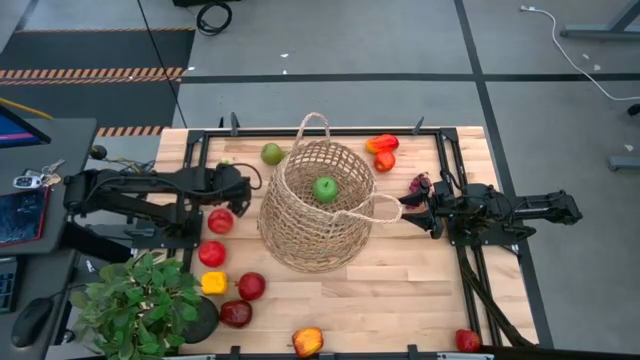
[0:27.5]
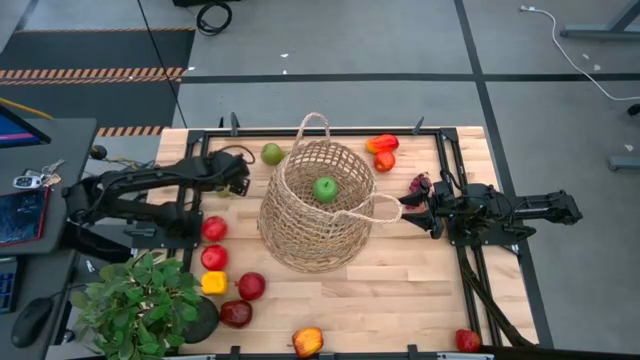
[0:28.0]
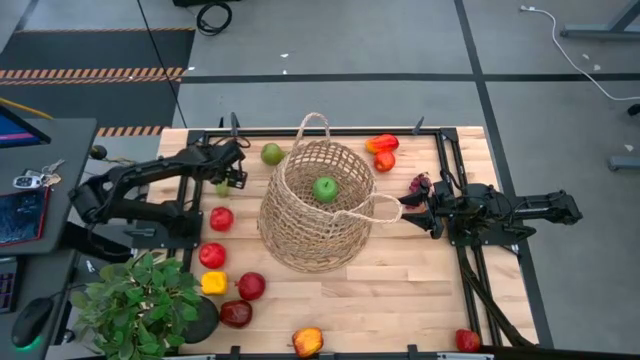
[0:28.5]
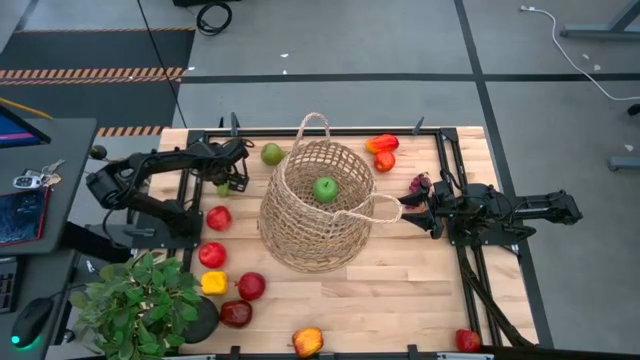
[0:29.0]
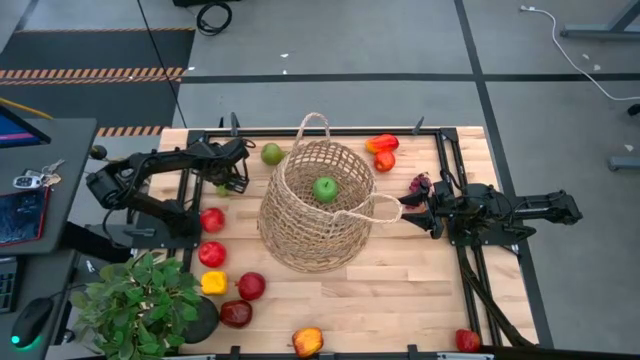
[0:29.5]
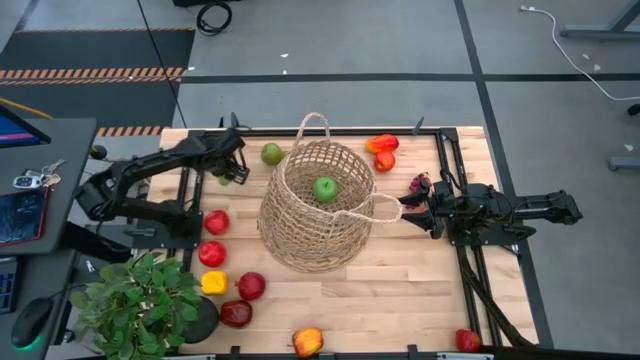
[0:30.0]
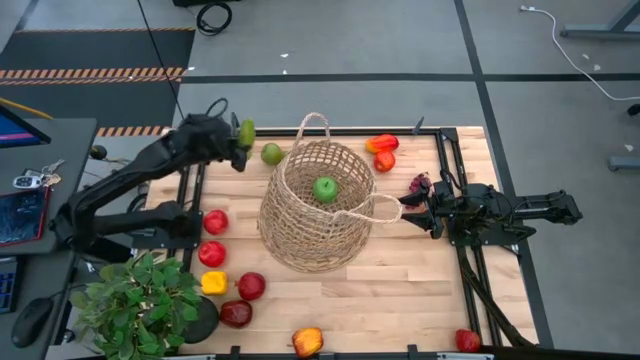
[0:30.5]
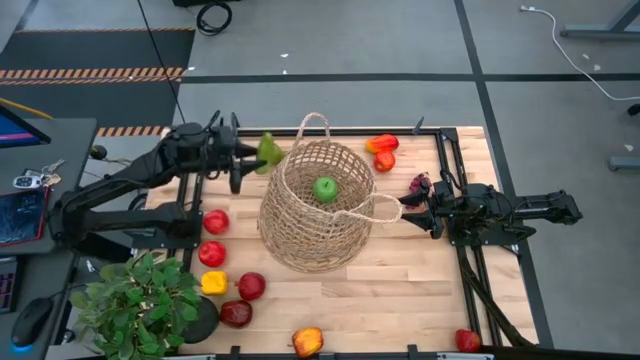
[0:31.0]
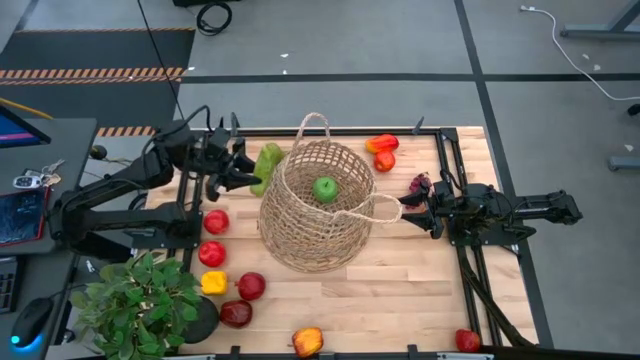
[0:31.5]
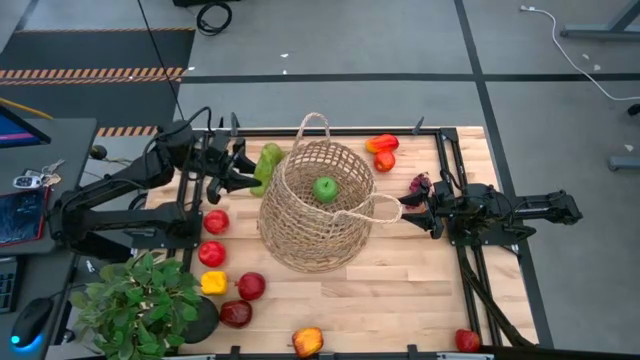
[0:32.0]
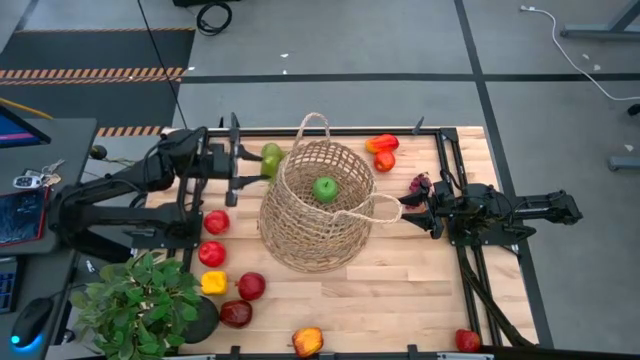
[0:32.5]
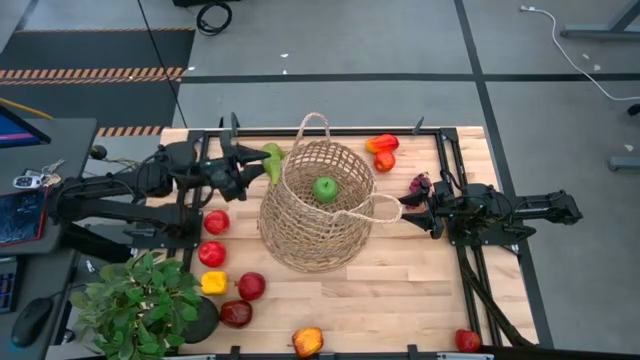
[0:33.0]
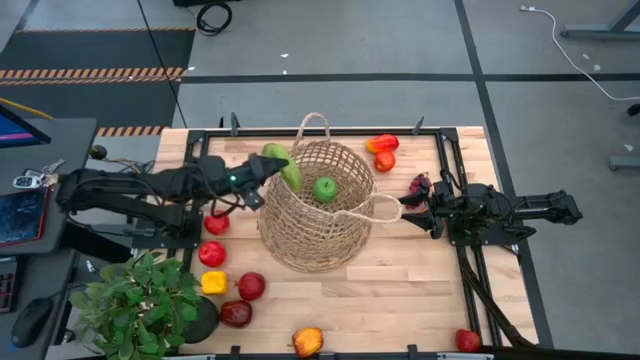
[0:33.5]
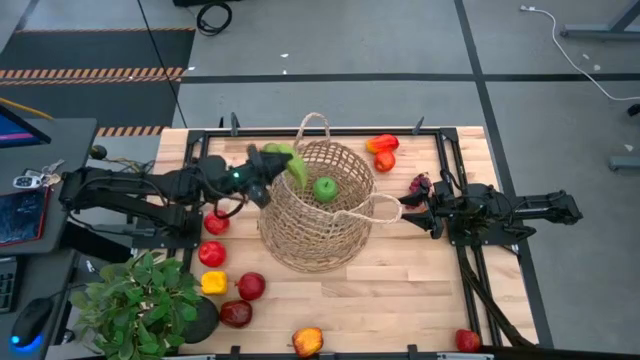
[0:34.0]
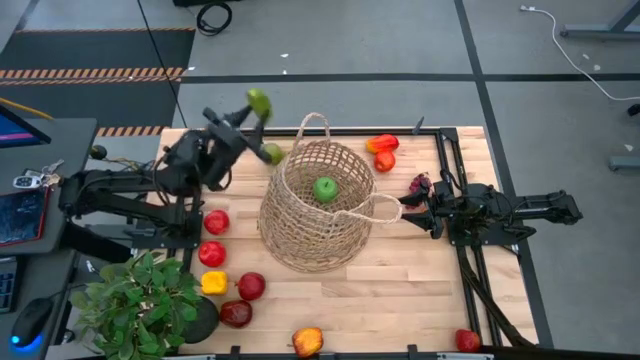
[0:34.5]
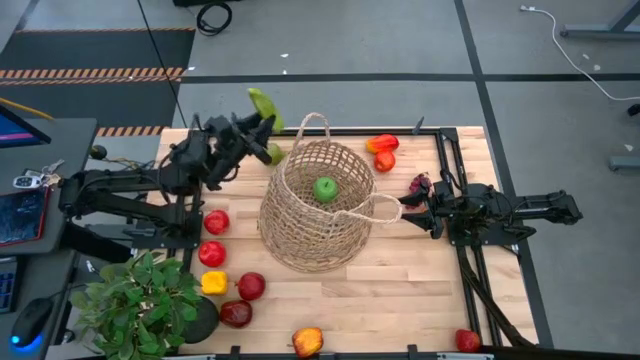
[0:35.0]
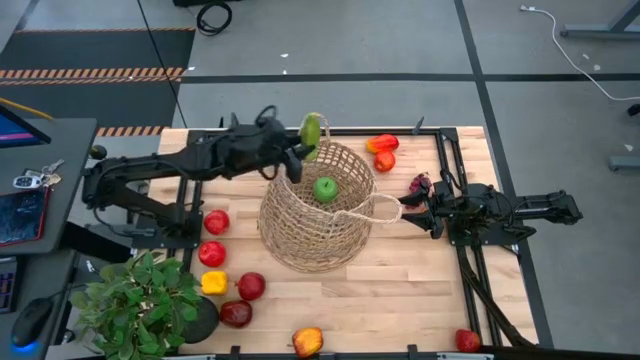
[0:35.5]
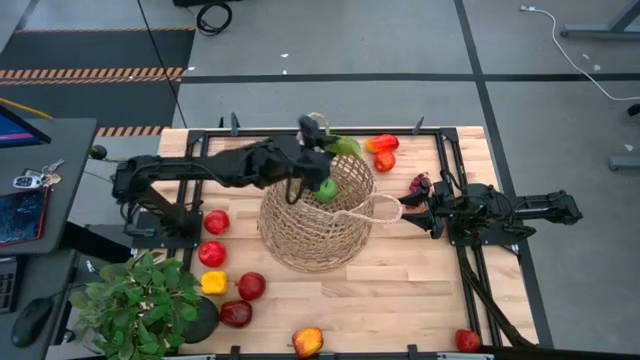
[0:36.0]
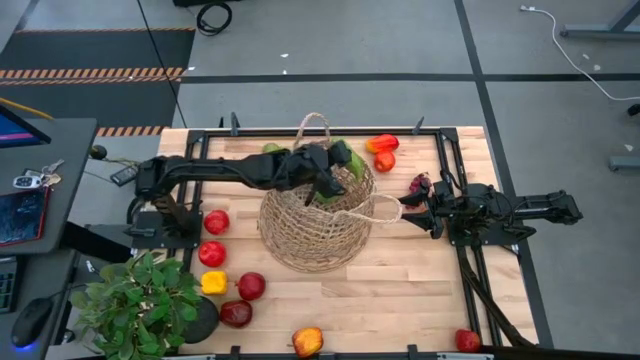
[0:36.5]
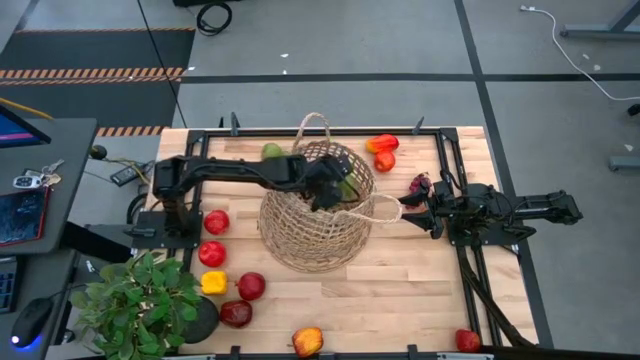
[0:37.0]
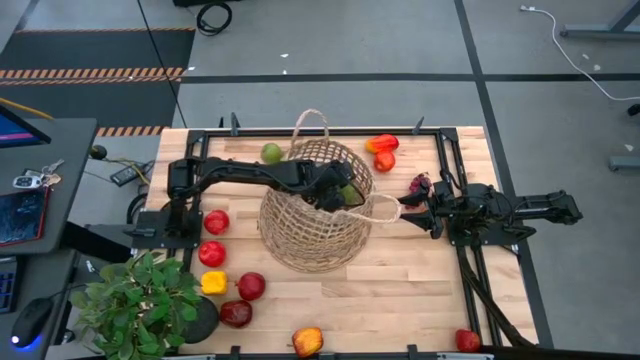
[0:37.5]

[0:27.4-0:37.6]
Task: Build produce basket
Put the cucumber into the basket

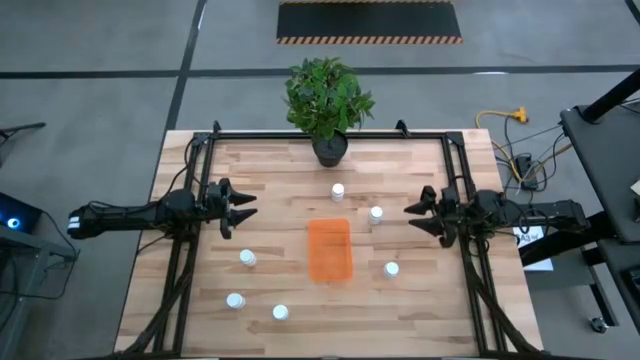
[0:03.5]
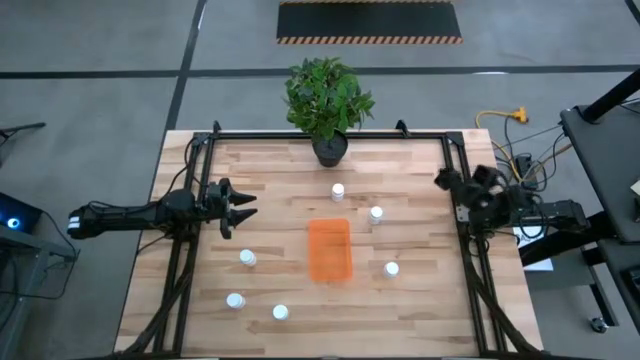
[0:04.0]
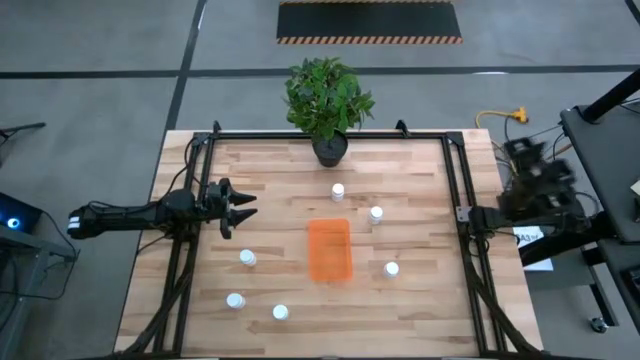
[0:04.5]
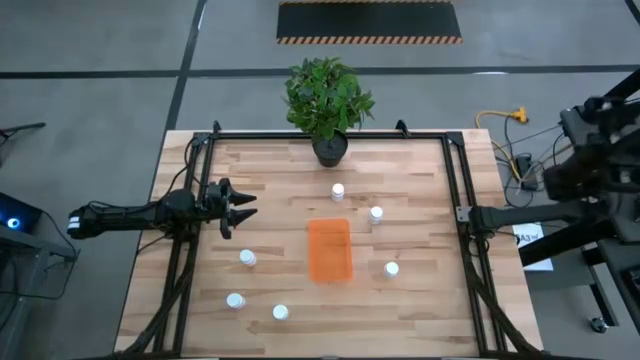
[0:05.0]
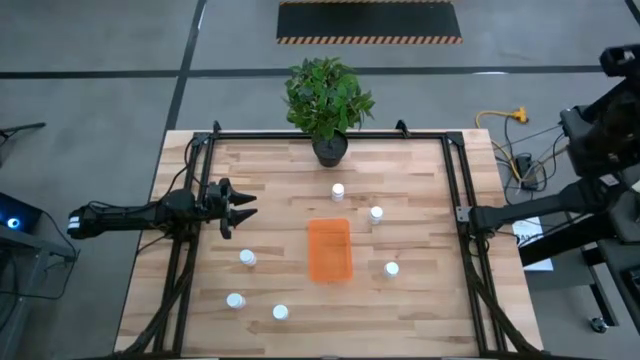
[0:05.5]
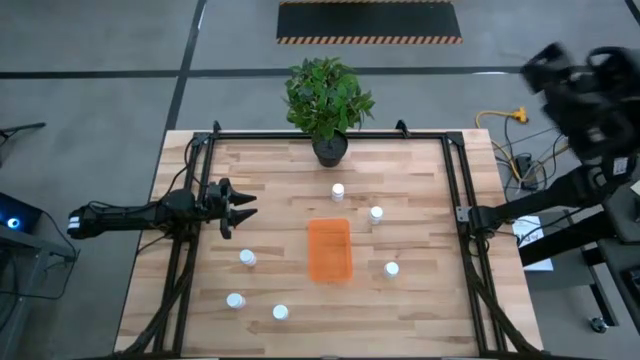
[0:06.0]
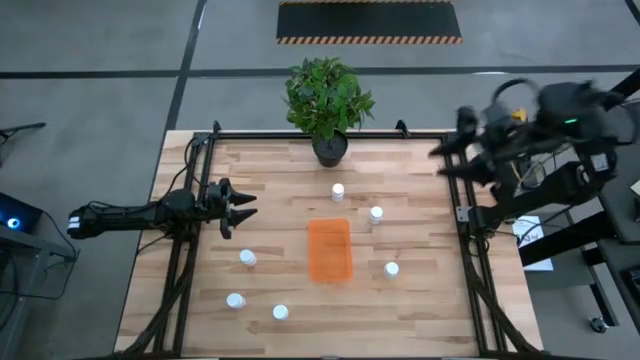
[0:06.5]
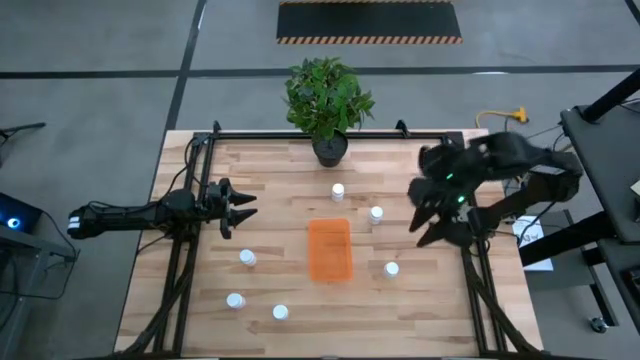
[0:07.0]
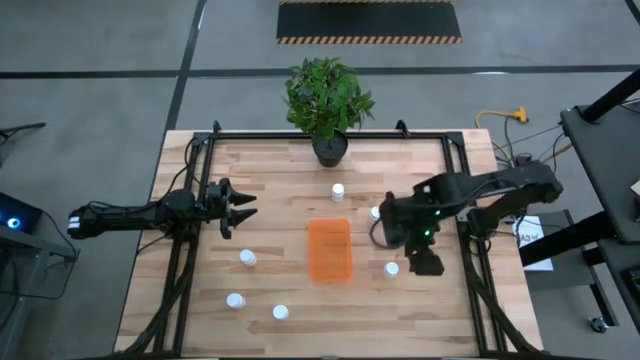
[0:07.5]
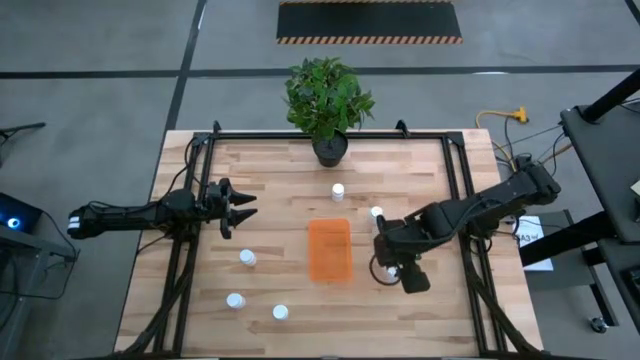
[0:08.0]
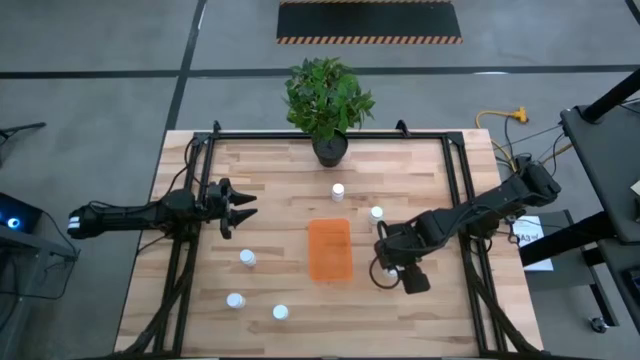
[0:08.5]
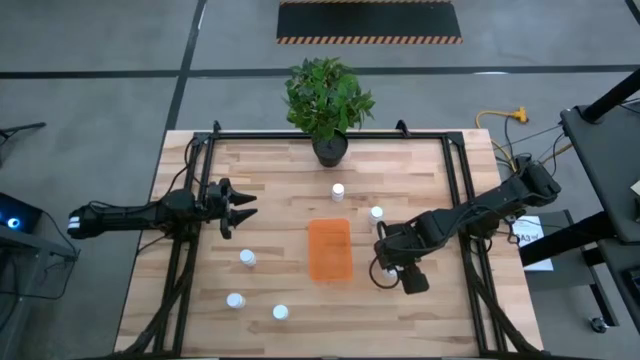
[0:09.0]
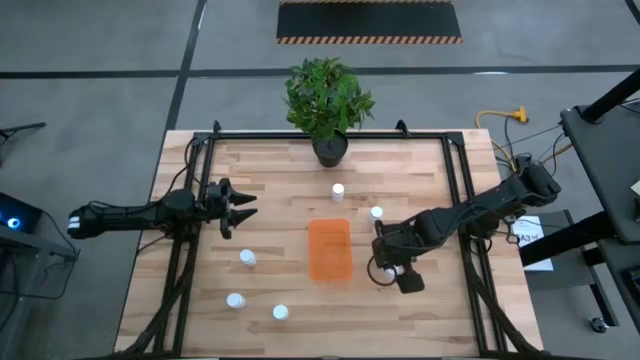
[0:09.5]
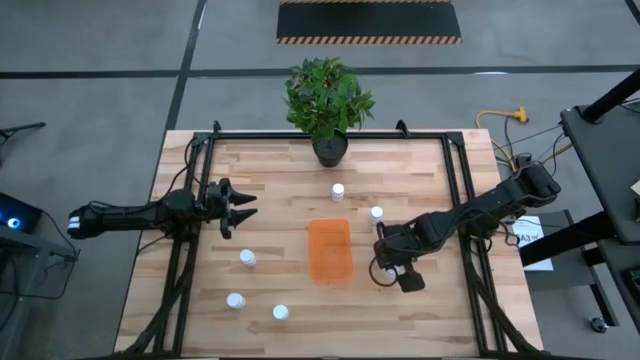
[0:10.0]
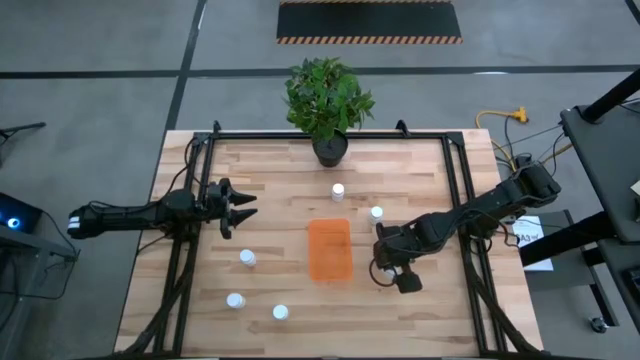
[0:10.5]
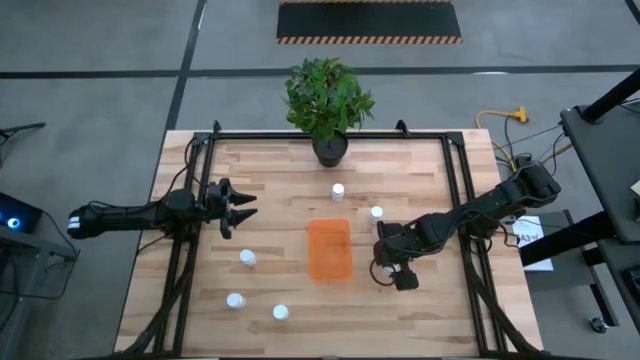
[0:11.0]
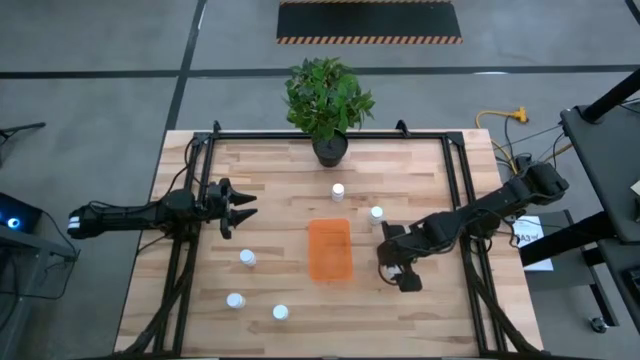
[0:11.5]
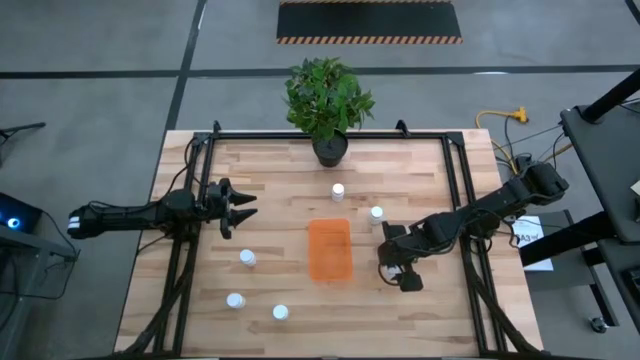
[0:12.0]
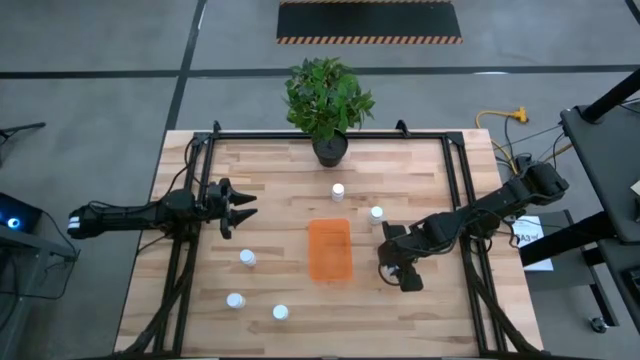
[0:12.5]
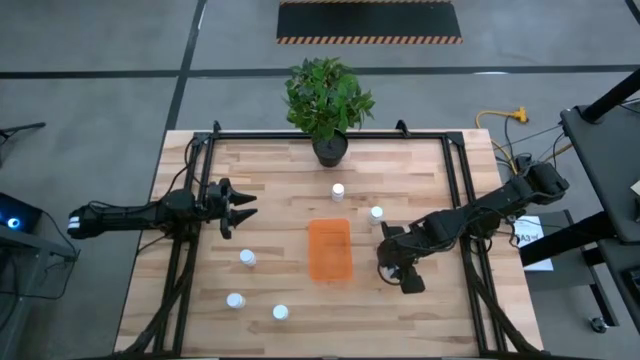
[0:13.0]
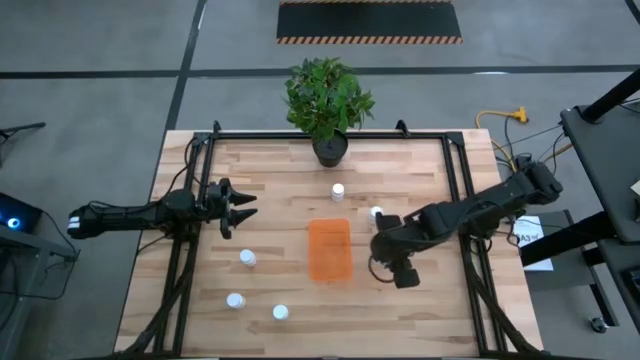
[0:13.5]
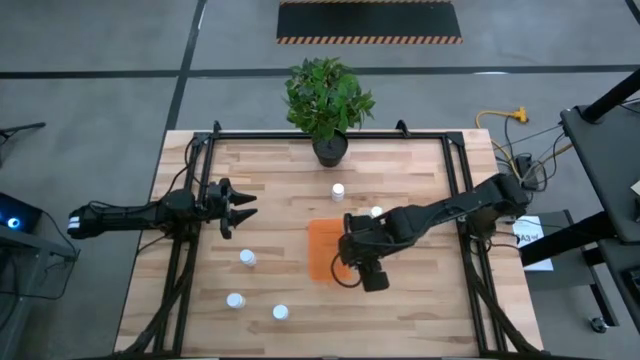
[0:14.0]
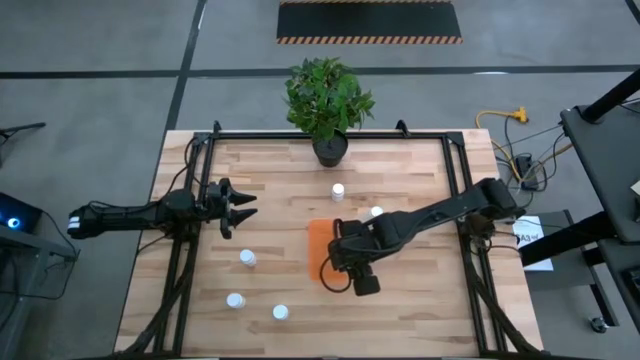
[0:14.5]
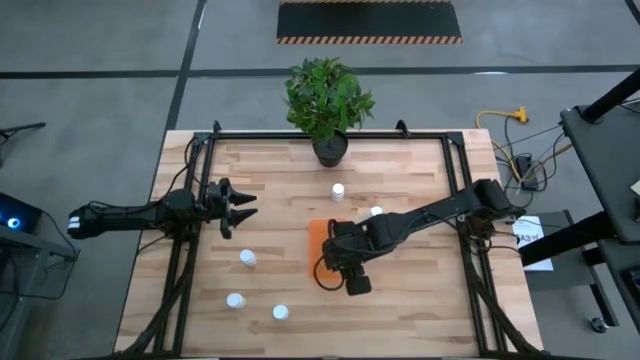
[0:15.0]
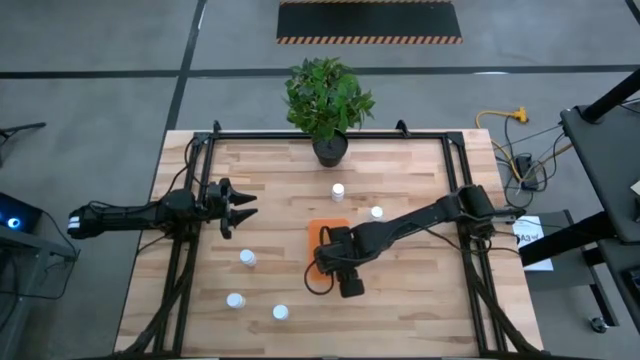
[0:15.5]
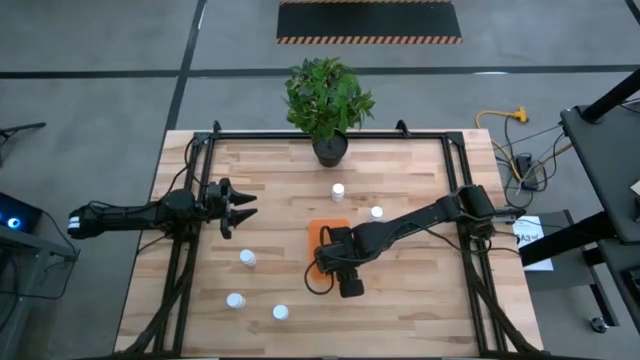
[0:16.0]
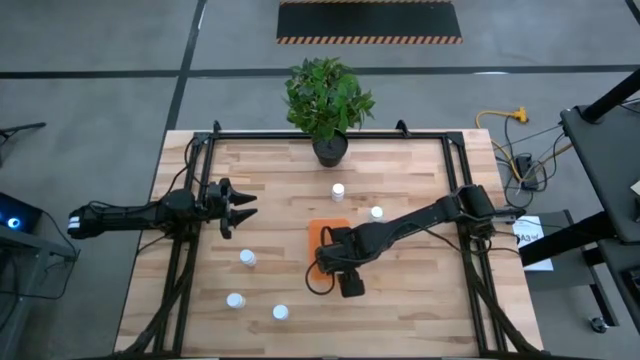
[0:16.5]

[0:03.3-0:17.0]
Task: Pick and place pill bottles into a basket
Put the white pill bottle into the orange bin
